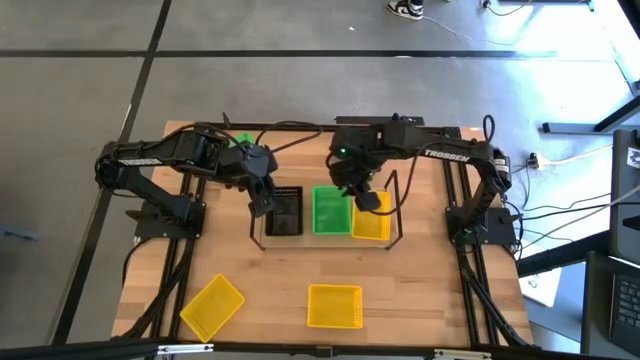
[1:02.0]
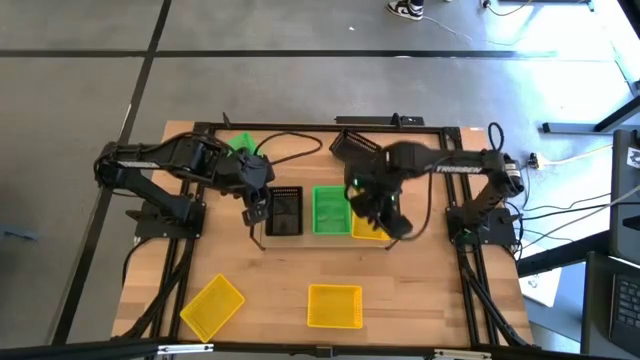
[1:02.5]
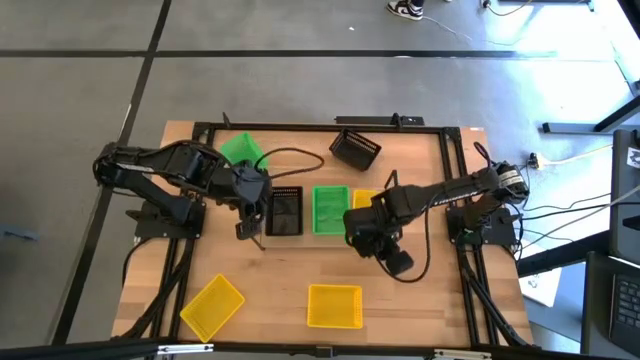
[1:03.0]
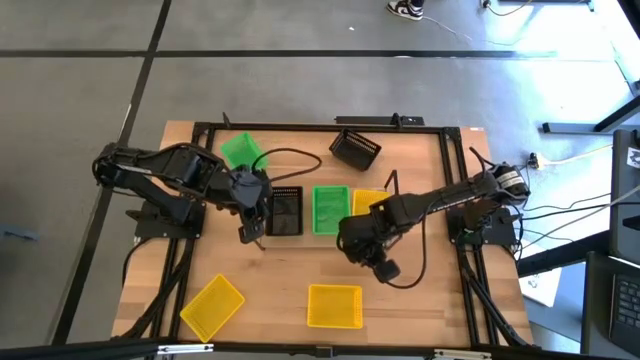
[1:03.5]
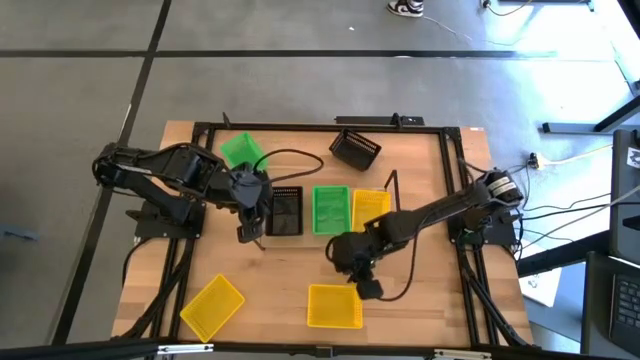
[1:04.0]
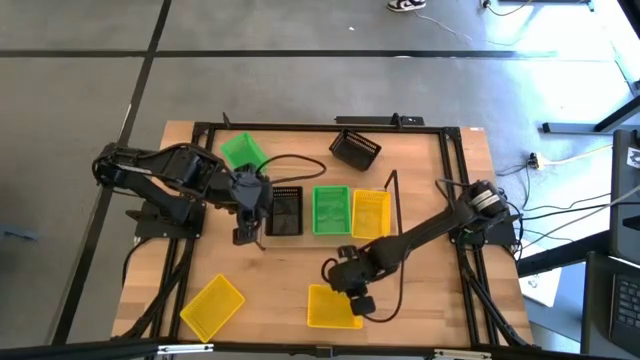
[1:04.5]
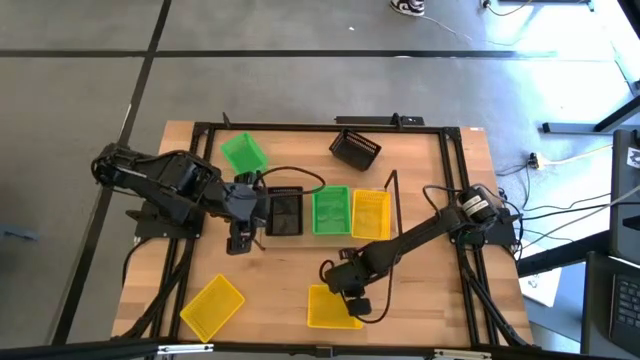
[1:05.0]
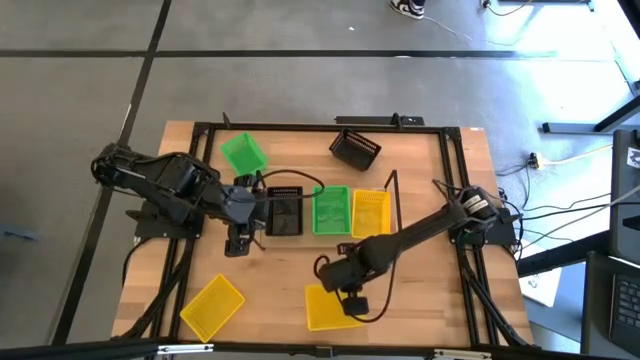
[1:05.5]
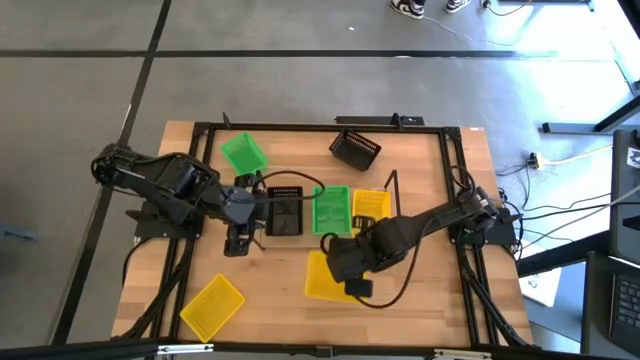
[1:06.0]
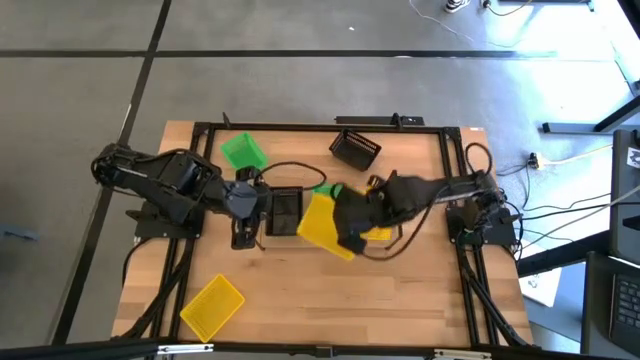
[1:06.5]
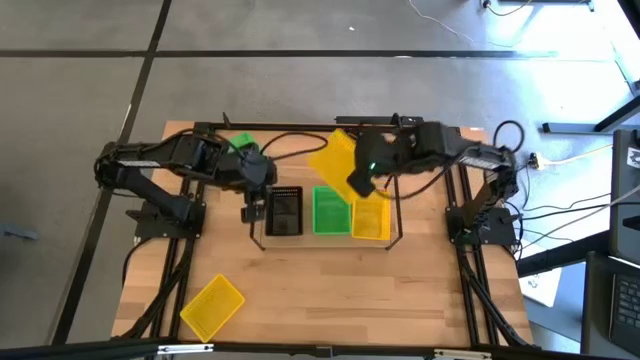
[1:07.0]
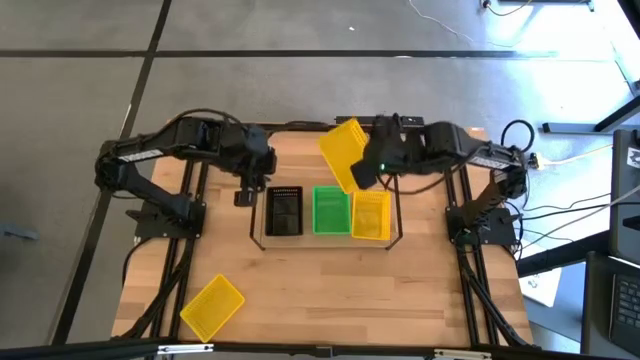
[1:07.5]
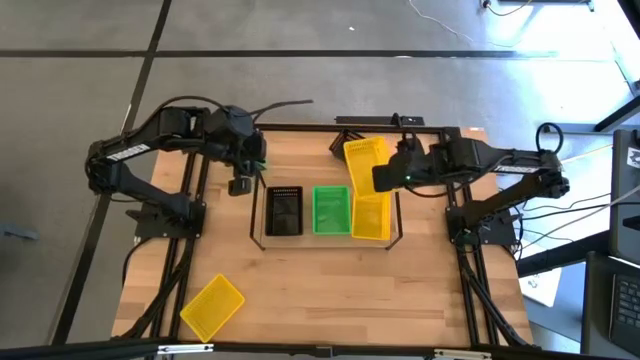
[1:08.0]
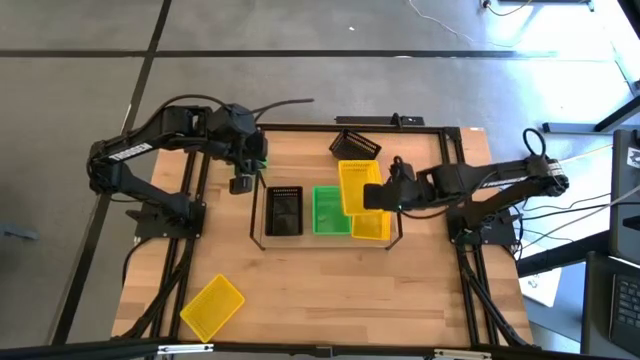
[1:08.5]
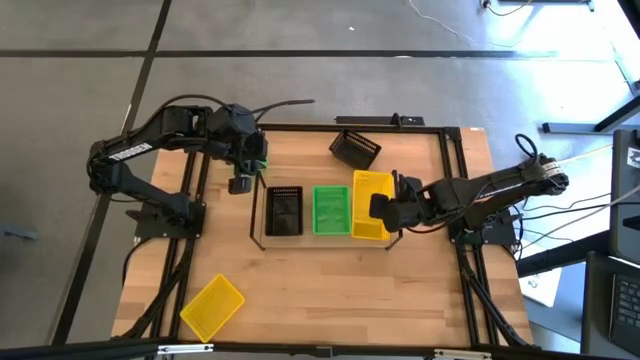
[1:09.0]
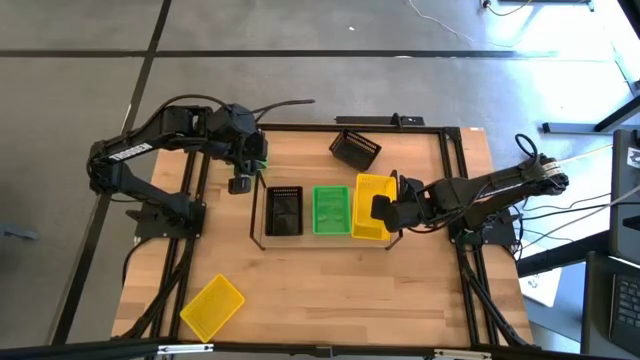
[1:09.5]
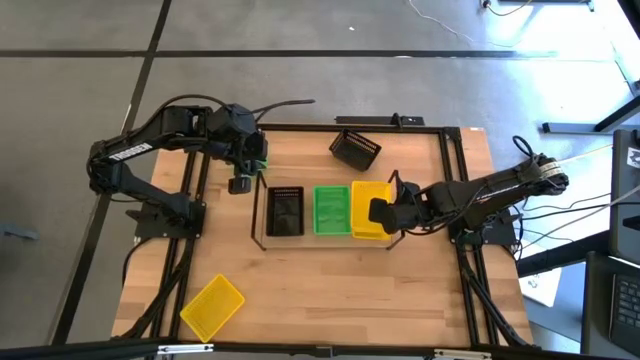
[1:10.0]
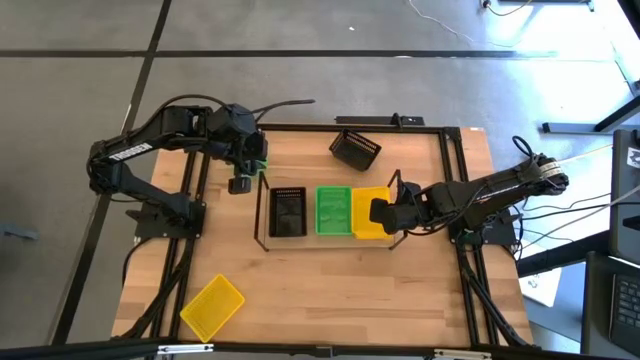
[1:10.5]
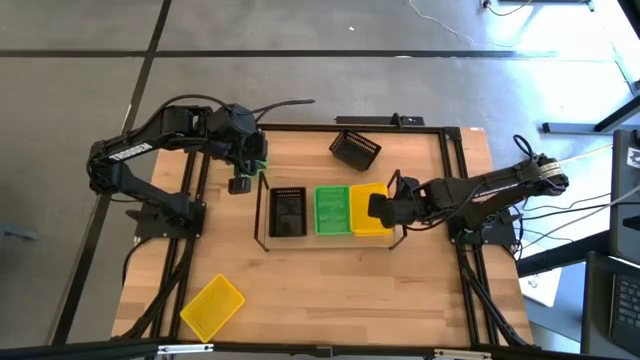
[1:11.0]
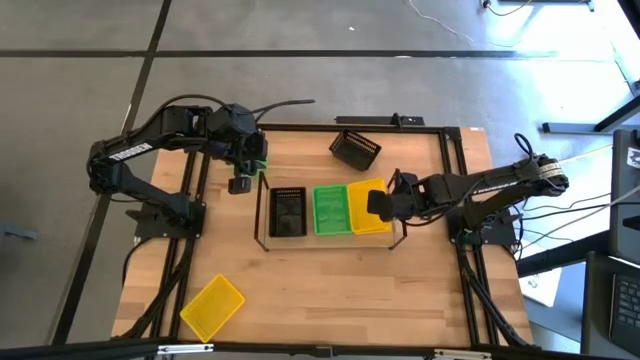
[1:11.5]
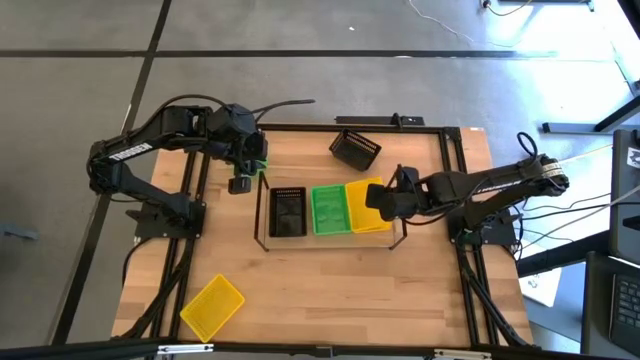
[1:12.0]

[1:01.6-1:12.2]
Task: Stack baskets on shelf by color
Stack the right yellow bin on top of the yellow bin on the shelf

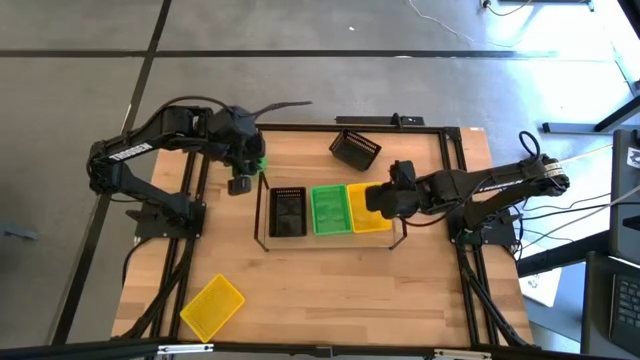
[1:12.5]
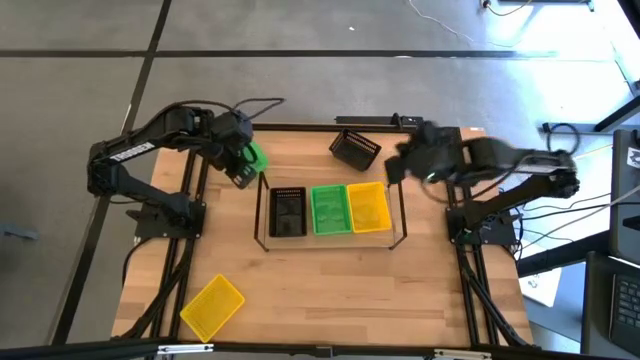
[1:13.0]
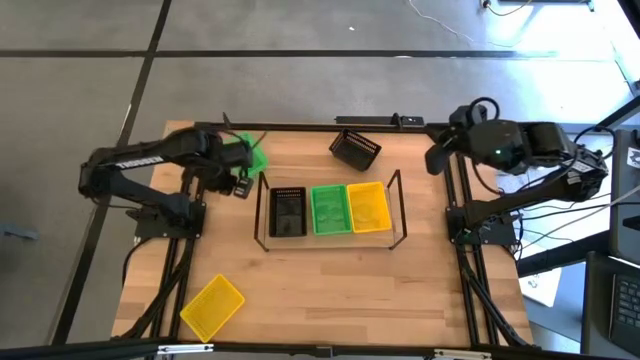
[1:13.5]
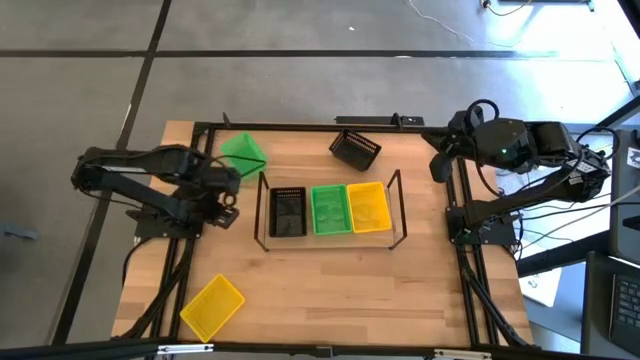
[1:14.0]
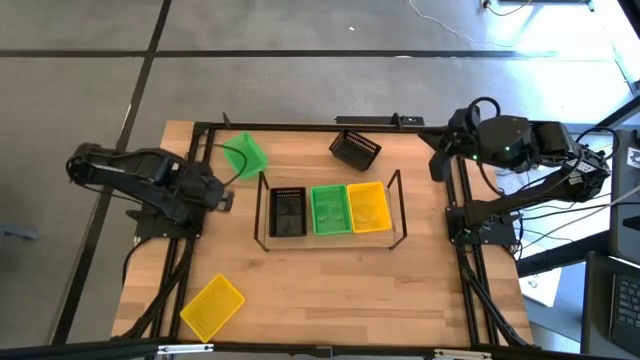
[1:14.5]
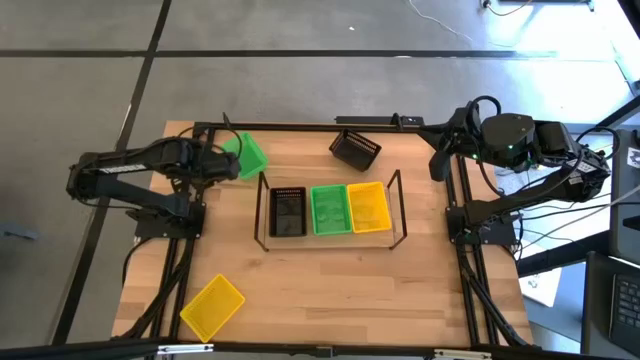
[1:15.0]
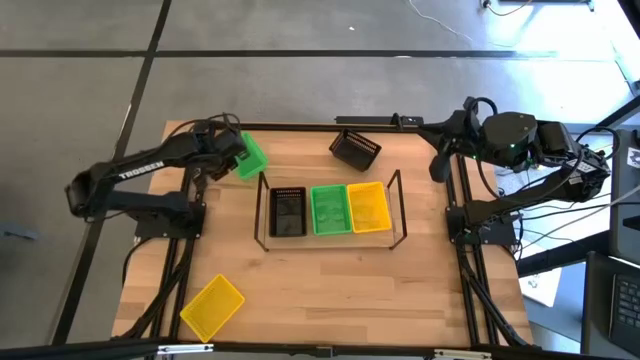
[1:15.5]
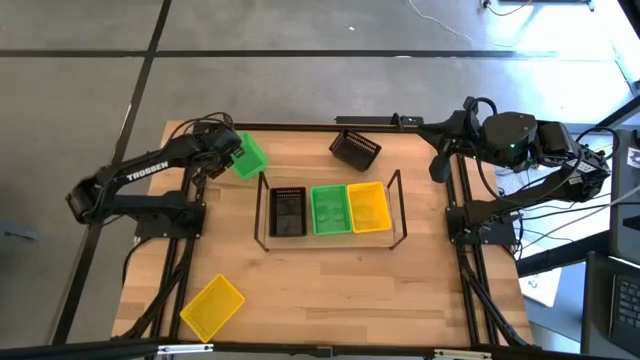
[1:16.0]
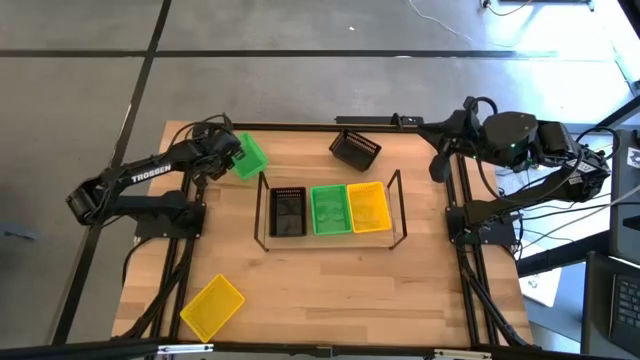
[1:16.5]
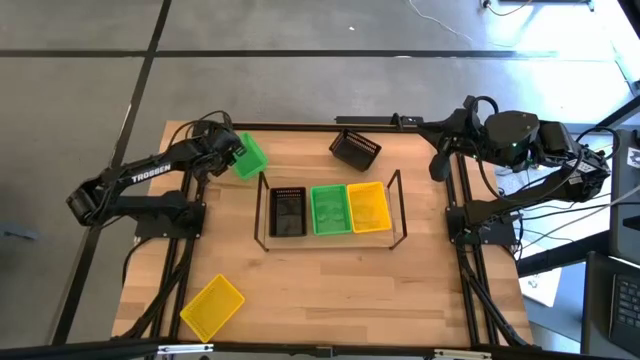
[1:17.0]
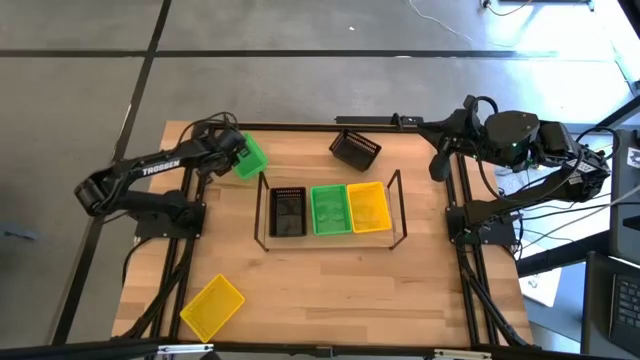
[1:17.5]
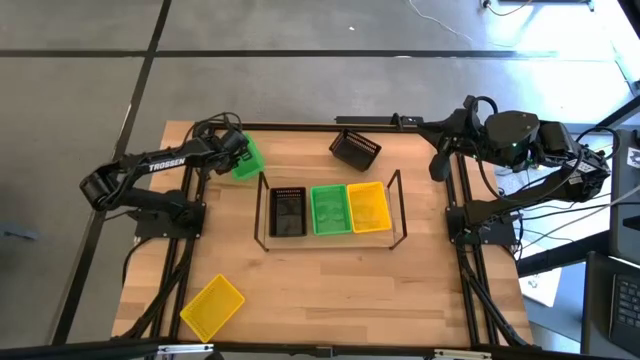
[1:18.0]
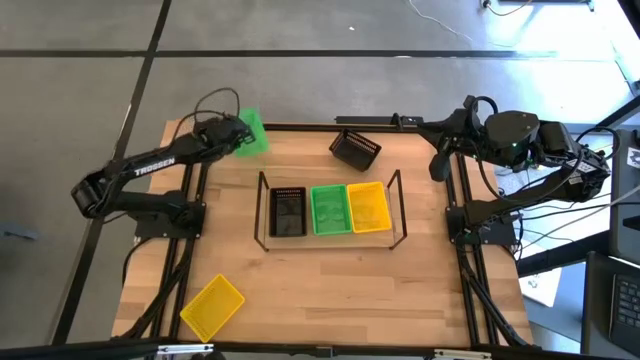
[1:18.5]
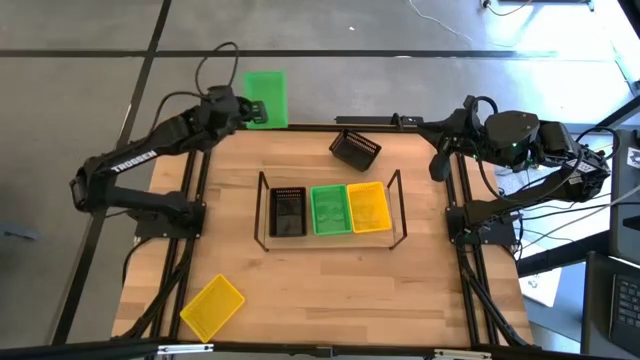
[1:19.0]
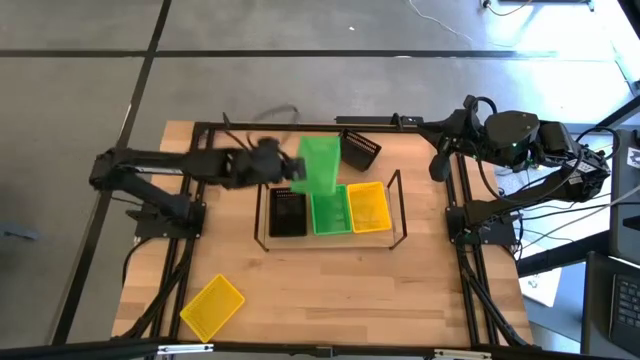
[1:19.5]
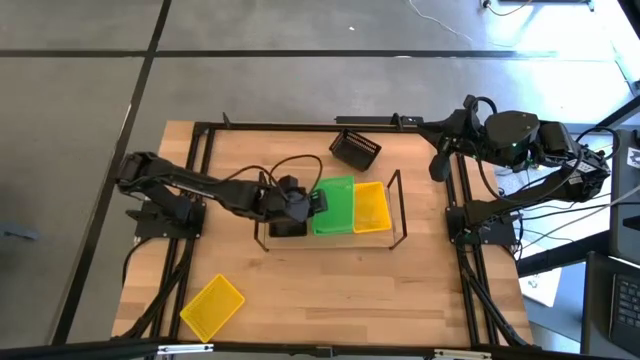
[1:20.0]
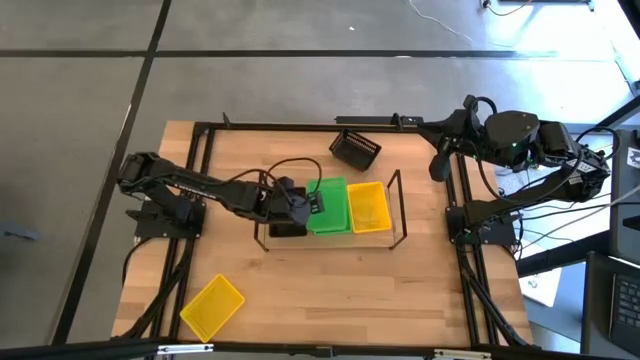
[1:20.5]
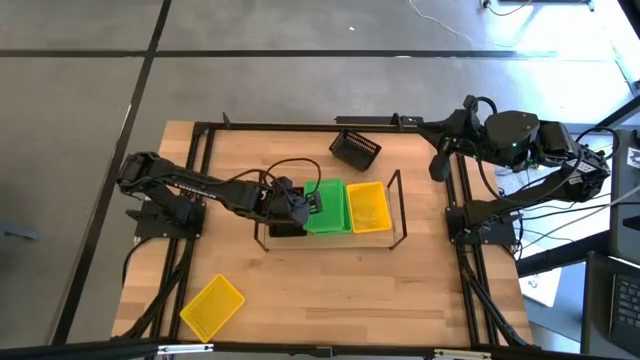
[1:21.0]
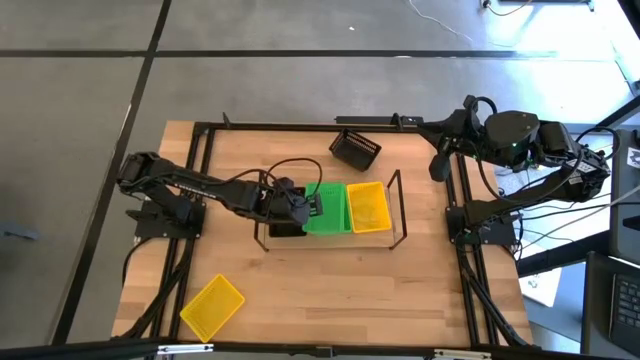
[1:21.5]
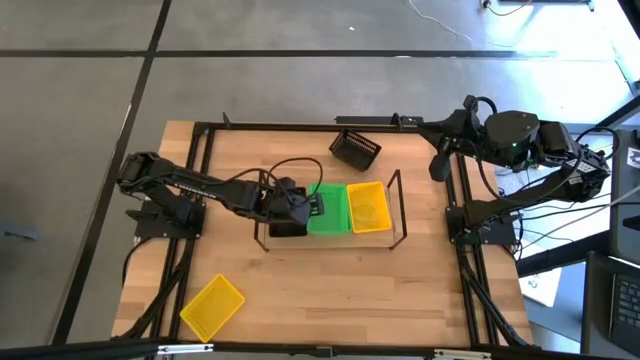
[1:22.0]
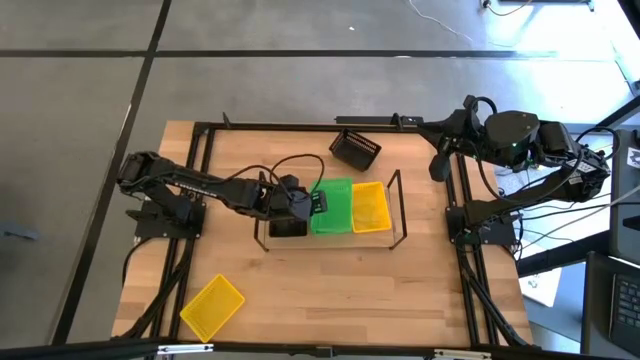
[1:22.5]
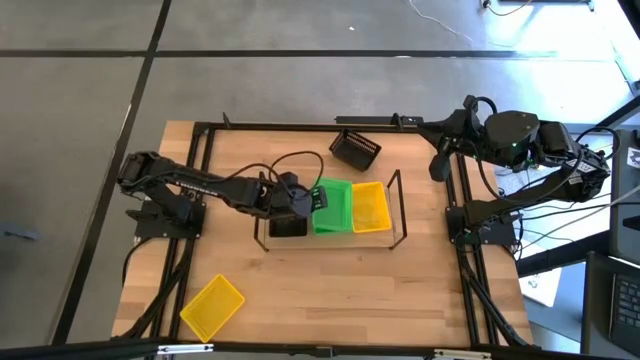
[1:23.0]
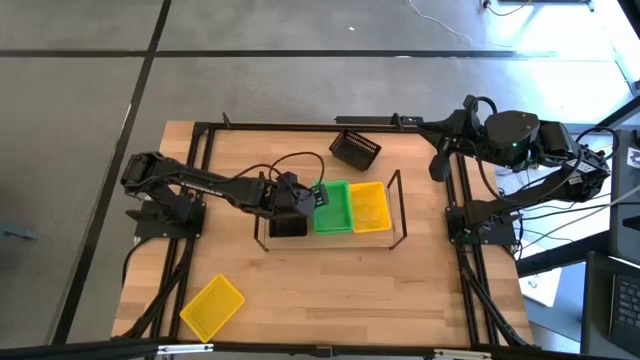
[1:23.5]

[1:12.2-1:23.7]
Stack the green bin on top of the green bin on the shelf
